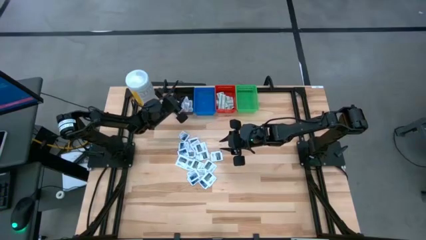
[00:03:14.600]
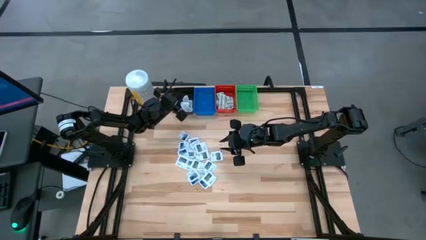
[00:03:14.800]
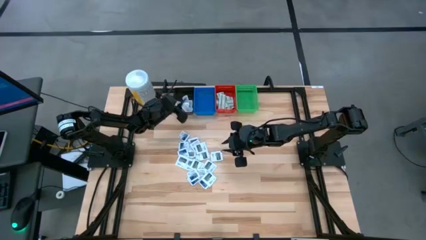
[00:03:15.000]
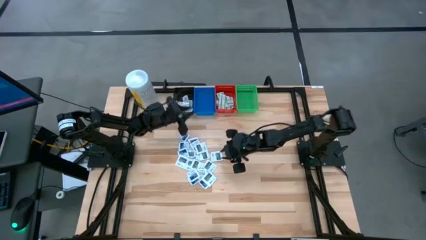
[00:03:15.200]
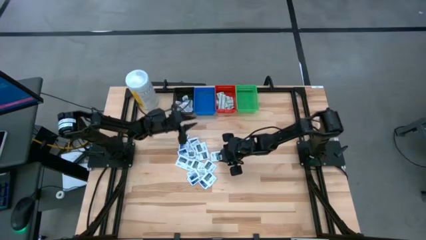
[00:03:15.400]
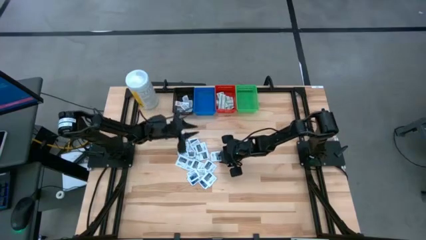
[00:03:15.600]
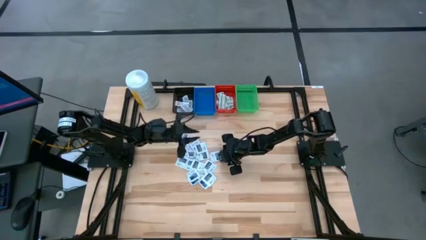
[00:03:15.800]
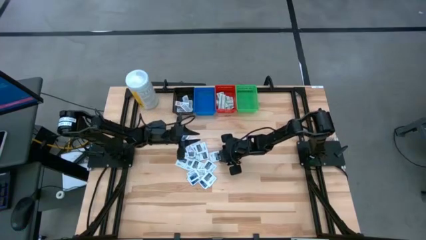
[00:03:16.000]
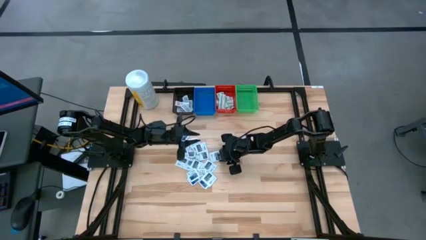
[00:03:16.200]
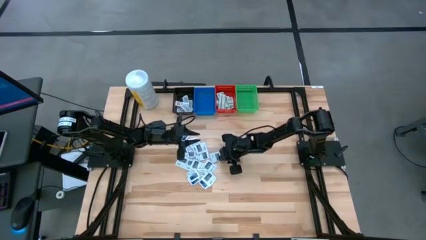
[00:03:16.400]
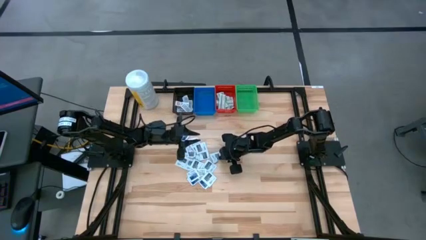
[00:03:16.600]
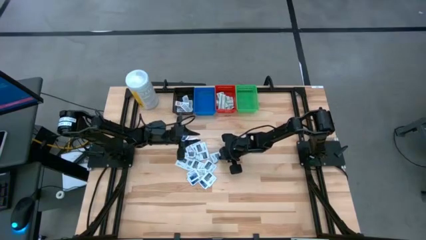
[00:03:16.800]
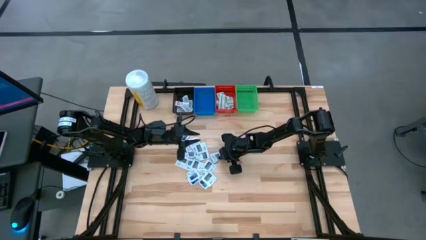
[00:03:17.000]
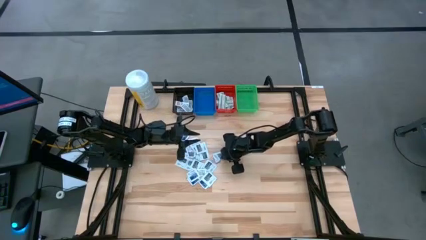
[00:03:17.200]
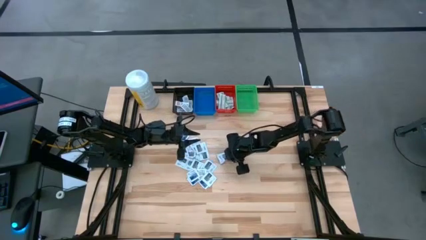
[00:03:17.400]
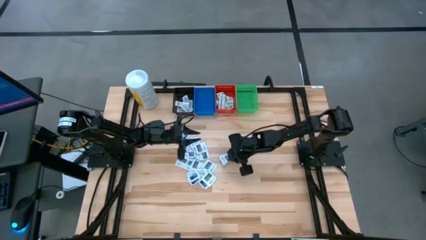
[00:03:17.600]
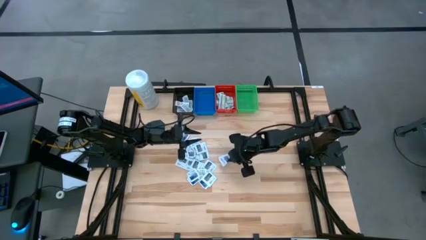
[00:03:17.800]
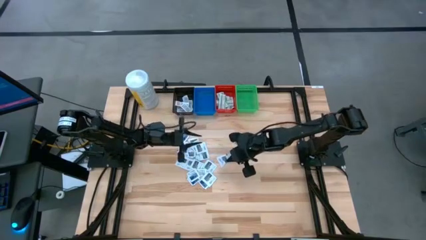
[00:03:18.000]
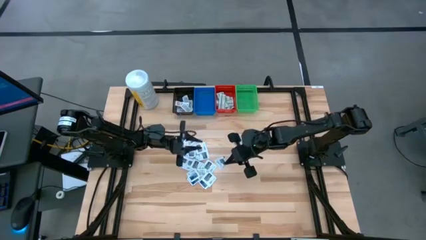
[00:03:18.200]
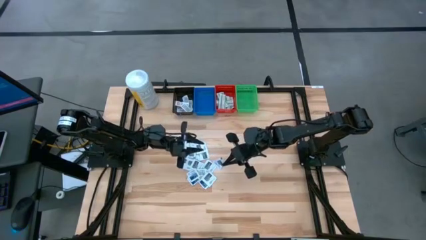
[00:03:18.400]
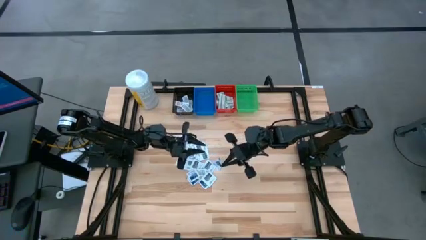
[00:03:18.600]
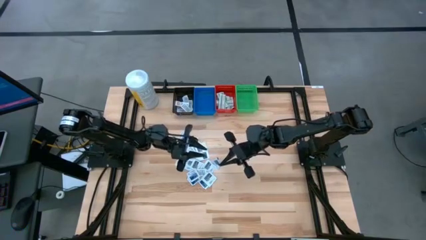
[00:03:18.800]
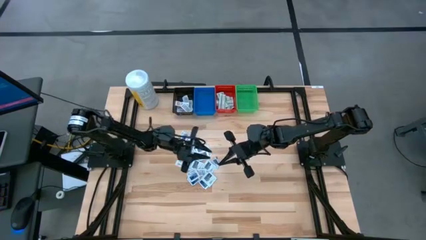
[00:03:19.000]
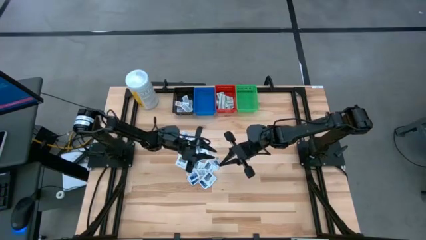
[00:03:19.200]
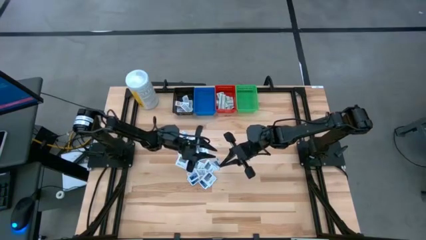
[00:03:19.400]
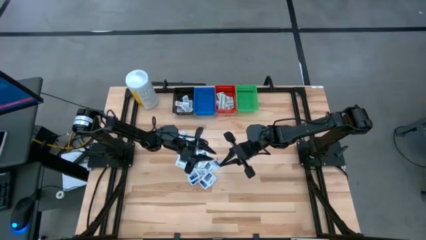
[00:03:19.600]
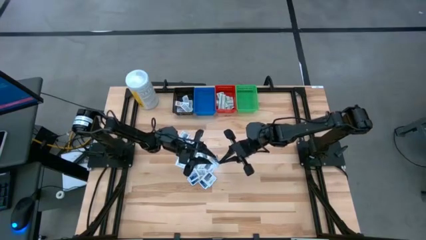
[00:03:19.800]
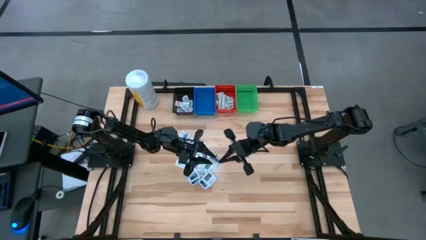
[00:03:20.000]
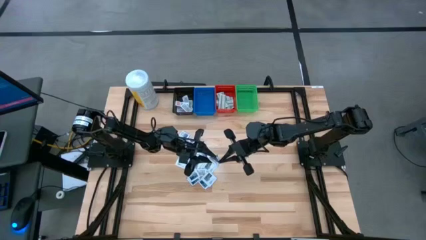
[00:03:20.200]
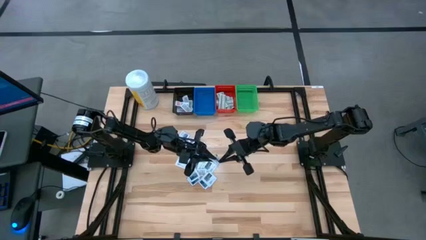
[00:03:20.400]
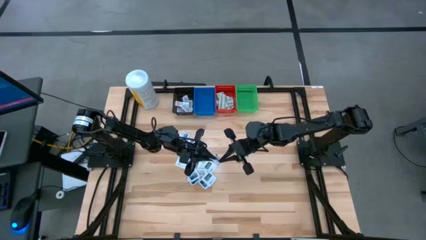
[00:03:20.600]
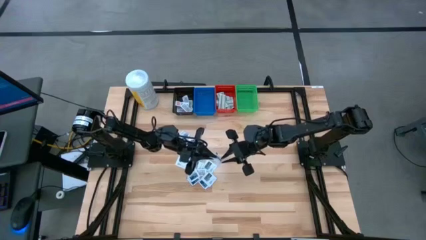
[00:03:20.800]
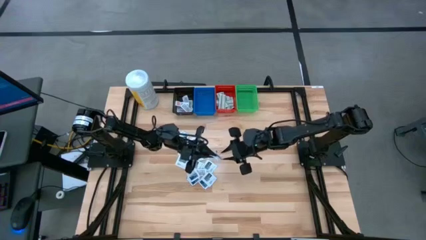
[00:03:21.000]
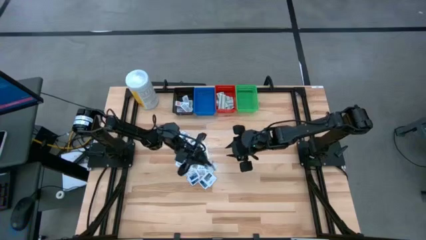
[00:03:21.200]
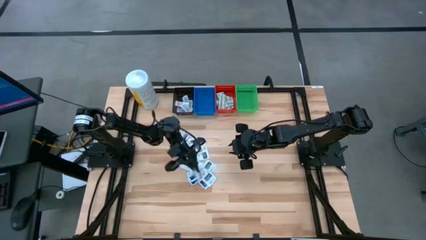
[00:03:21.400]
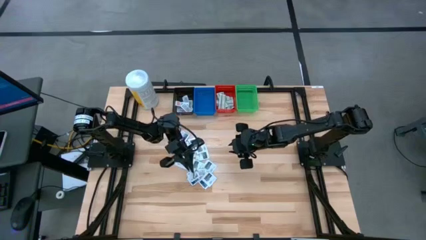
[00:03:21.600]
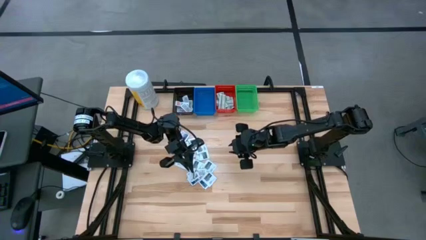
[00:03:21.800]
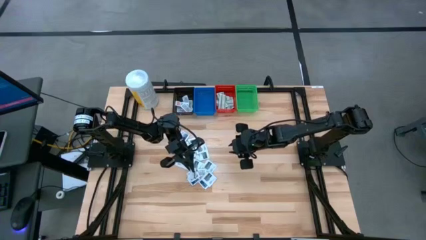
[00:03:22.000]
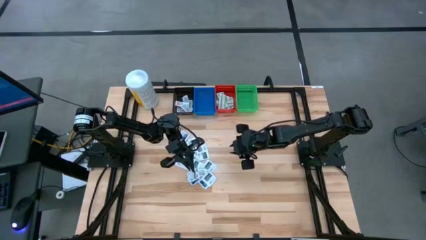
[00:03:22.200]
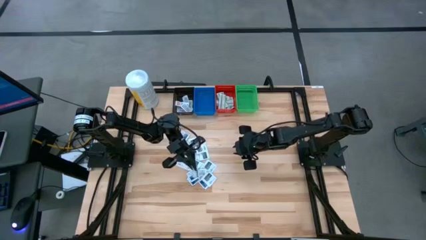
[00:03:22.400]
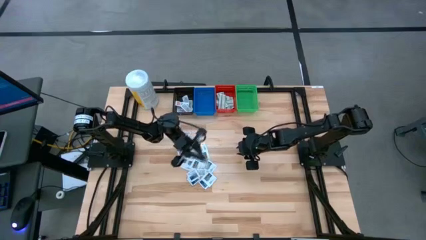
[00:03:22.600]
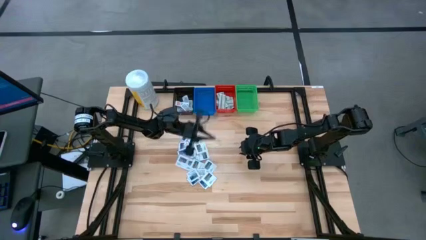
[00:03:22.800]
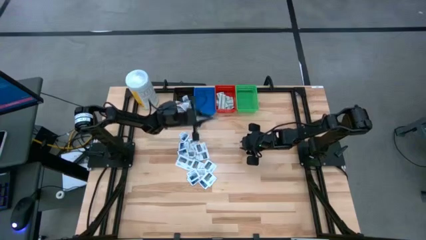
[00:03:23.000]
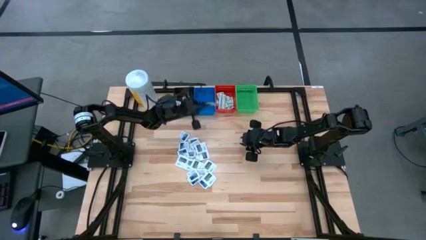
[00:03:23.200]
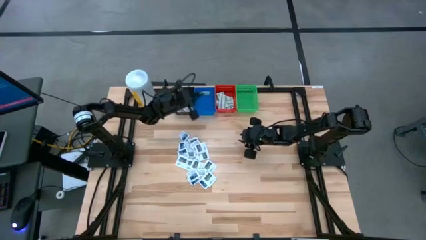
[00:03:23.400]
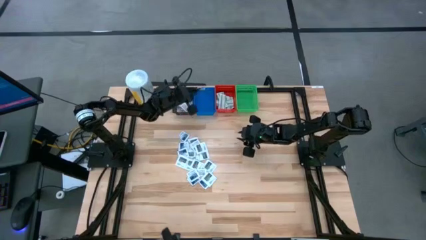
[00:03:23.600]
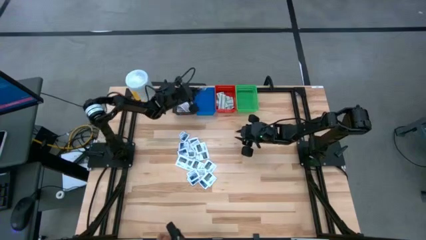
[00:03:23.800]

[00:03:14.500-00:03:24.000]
Task: Pick & Place First Aid Supplies
Put the gray towelette pack into the blue bin

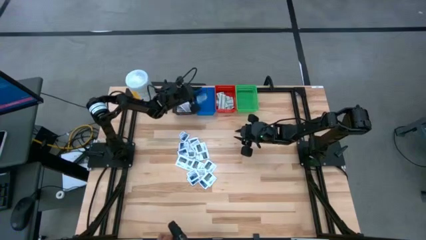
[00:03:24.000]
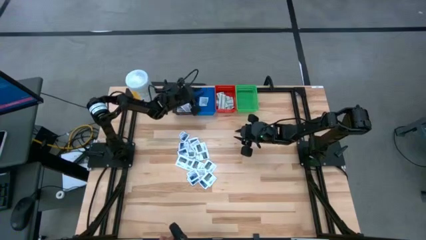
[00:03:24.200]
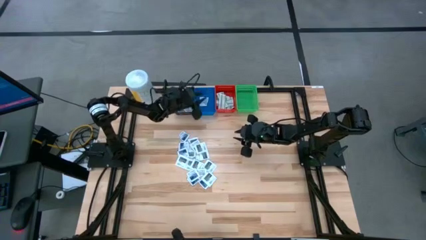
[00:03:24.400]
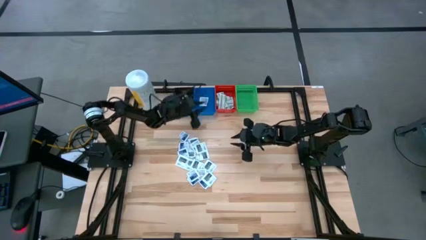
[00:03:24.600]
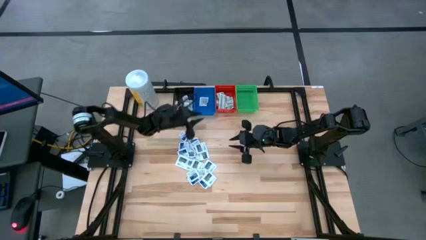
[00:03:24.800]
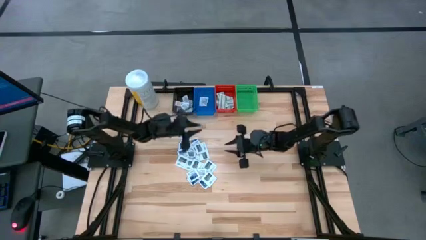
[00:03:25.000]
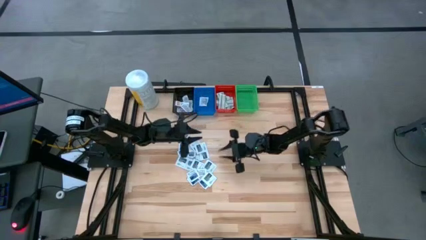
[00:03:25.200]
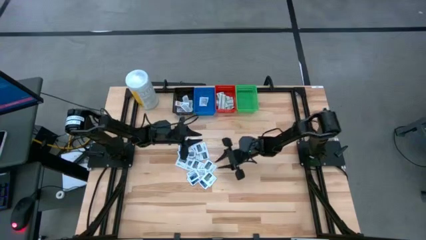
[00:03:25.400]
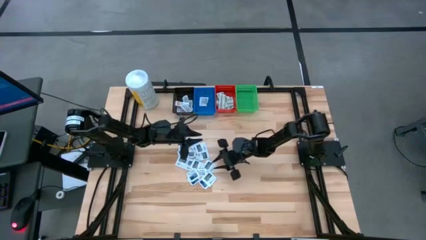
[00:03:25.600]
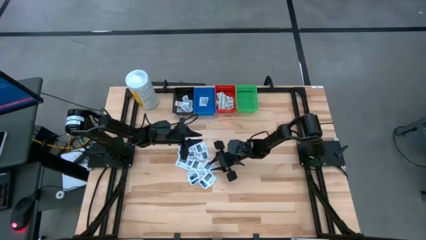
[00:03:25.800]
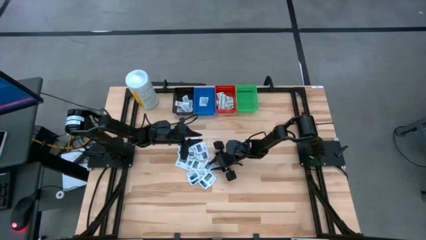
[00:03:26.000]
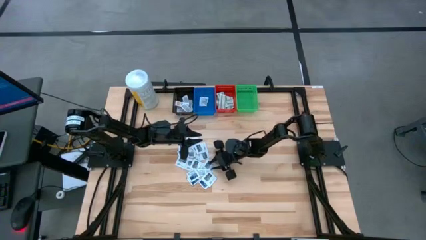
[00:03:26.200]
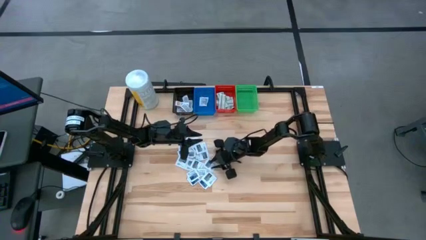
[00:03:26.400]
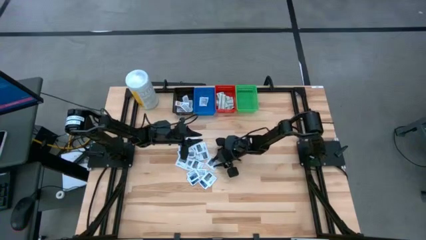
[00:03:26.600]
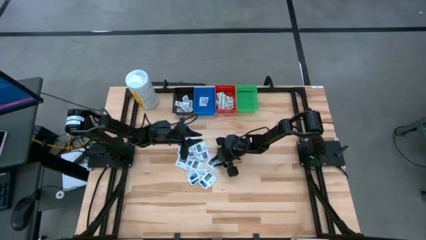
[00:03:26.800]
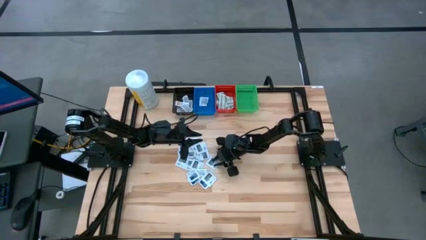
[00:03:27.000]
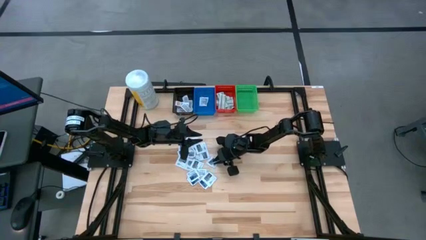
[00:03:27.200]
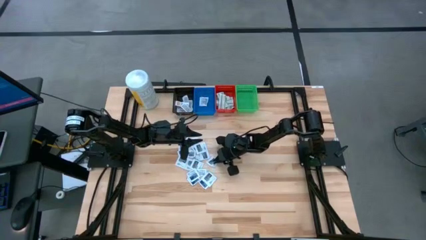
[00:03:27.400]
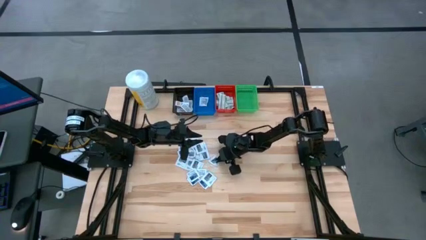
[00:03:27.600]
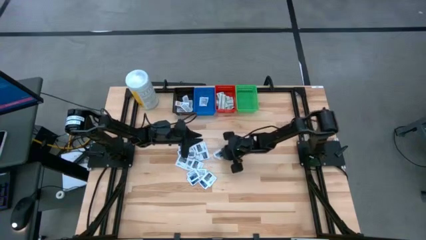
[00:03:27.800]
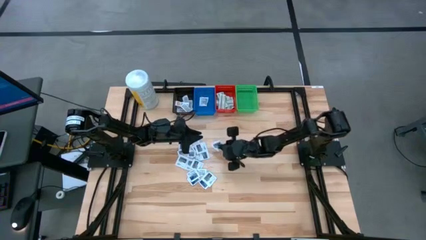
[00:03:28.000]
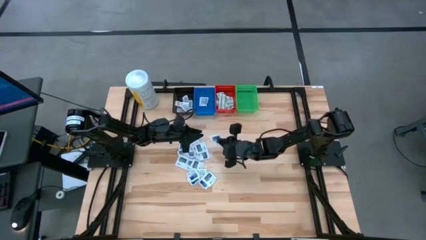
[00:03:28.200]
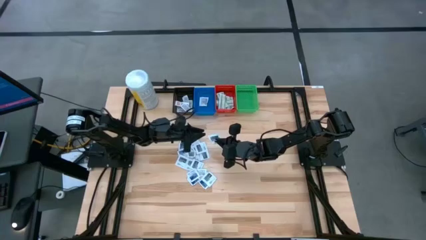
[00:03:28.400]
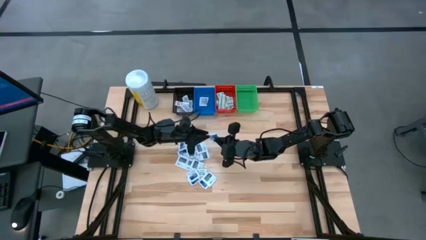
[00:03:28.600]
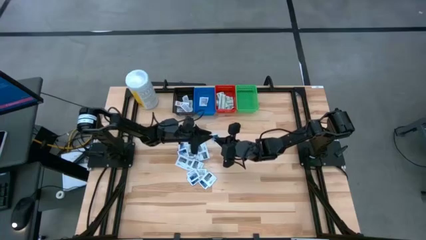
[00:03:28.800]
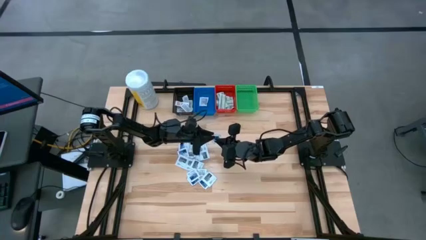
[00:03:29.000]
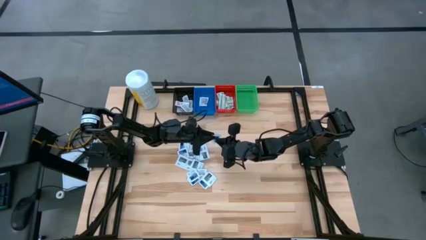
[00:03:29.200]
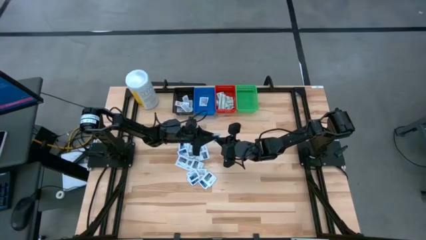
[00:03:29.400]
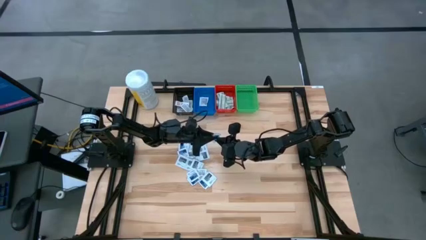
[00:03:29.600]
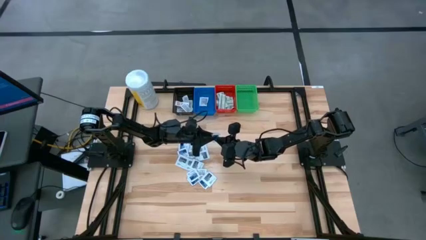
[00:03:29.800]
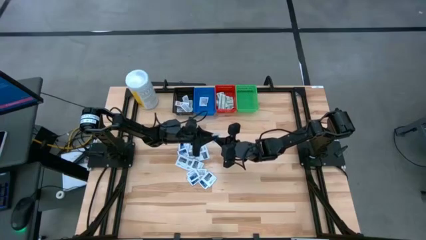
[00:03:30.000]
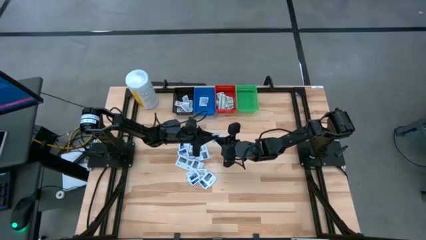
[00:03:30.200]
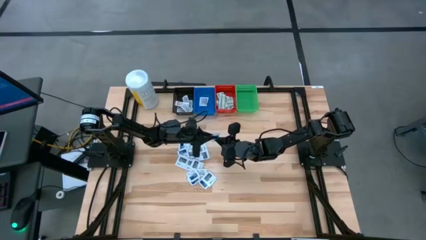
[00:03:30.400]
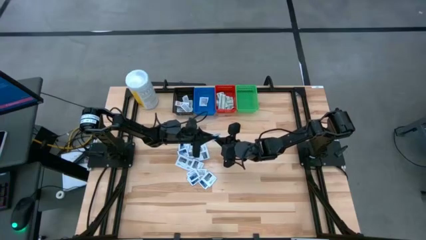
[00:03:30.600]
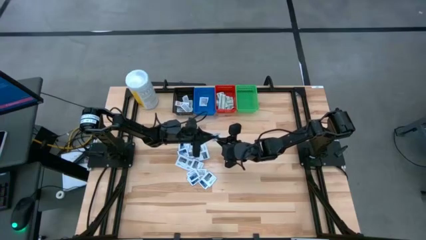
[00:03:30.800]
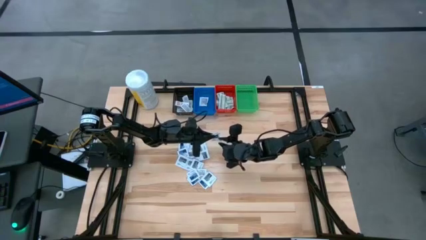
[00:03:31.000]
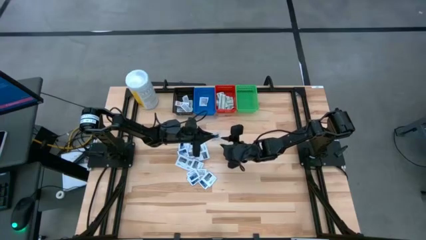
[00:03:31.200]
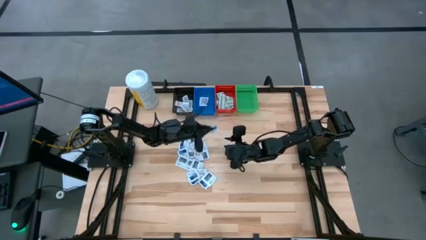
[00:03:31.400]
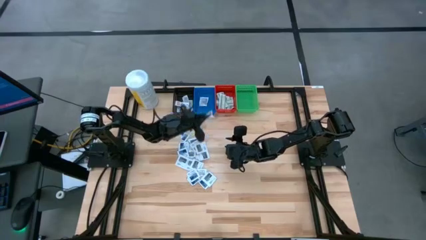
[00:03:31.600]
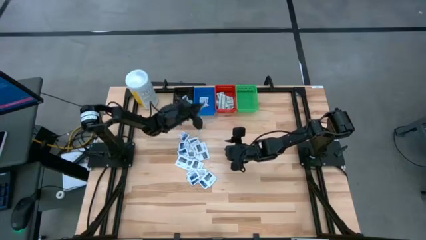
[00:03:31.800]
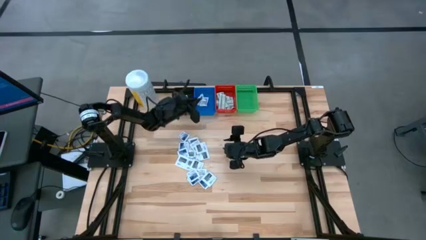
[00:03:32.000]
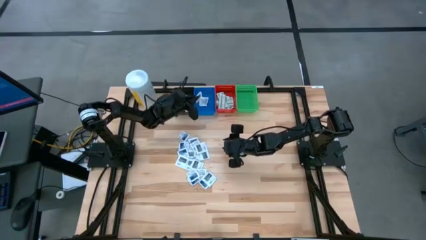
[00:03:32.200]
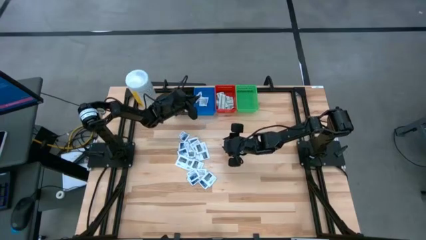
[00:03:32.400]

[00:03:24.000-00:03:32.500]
Put the gray towelette pack into the blue bin
